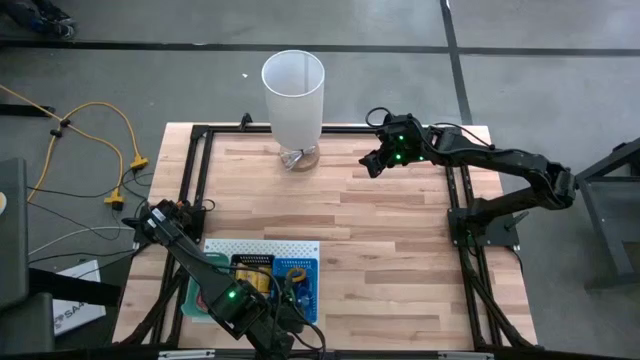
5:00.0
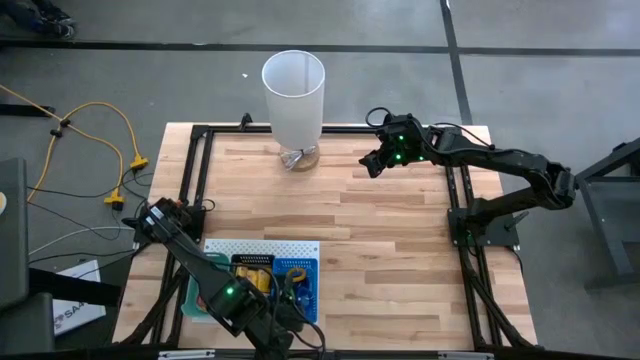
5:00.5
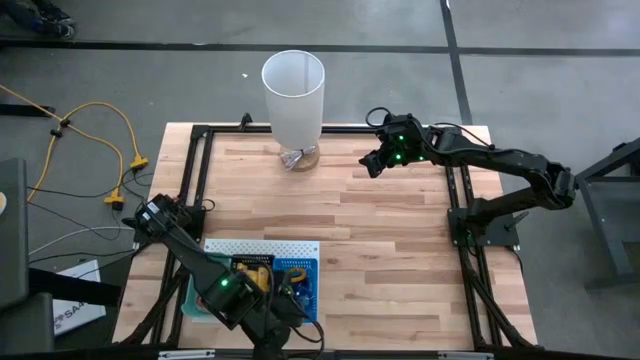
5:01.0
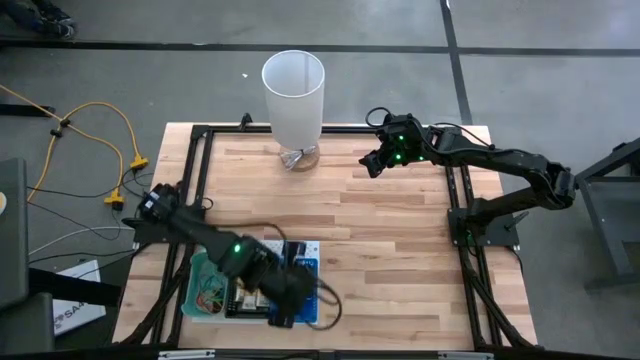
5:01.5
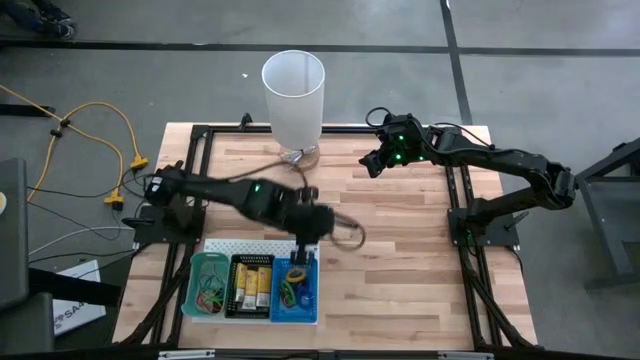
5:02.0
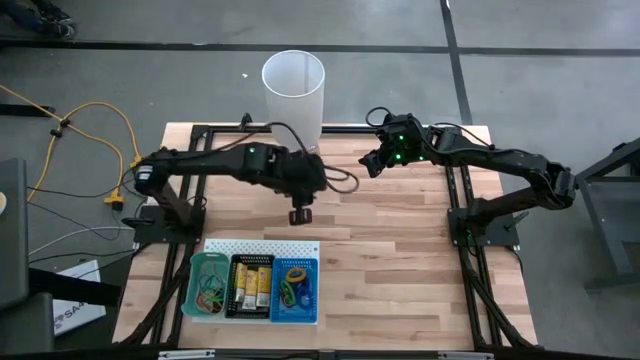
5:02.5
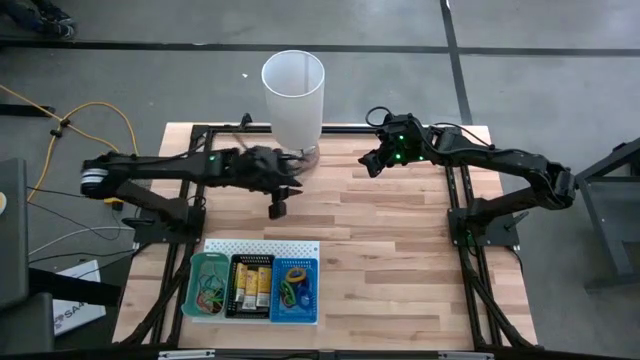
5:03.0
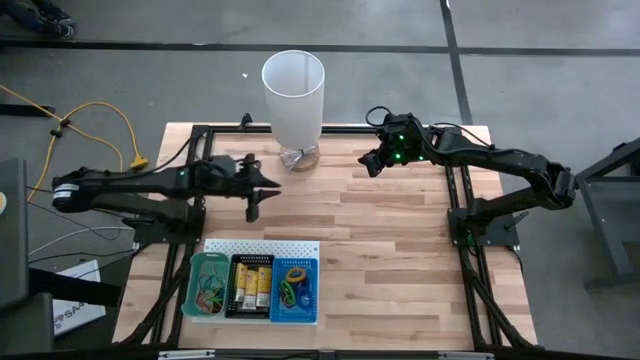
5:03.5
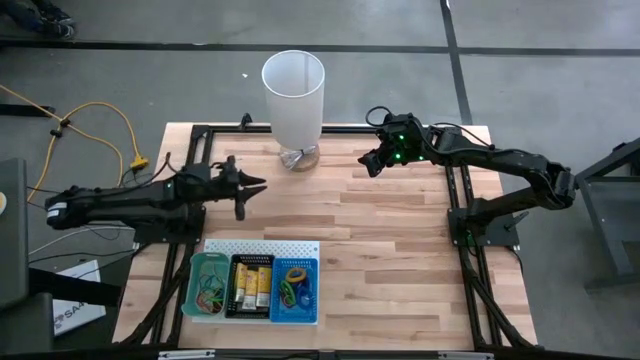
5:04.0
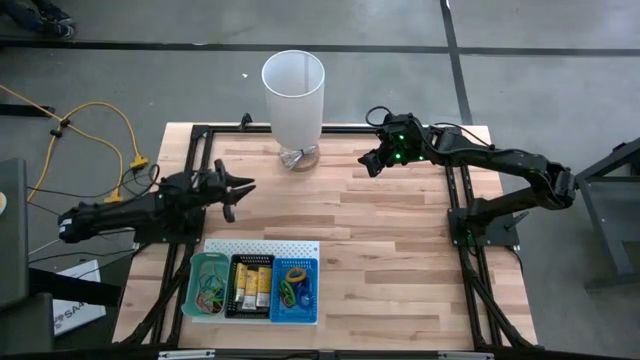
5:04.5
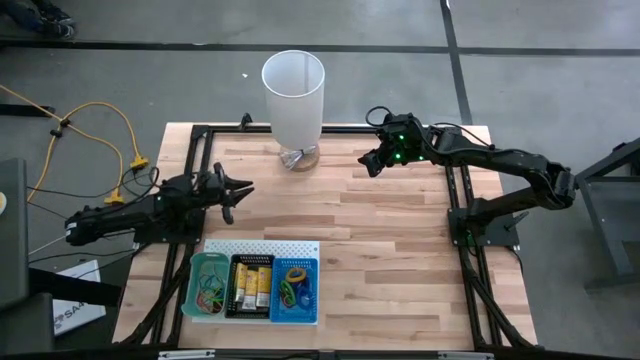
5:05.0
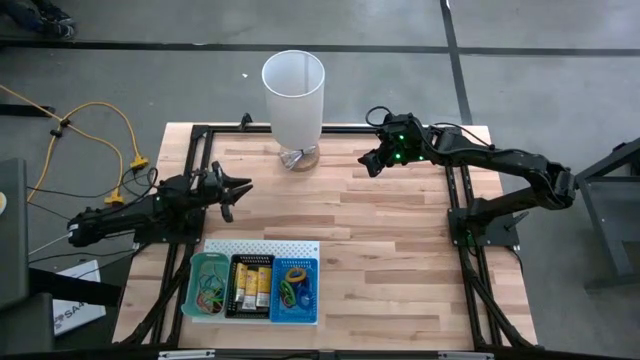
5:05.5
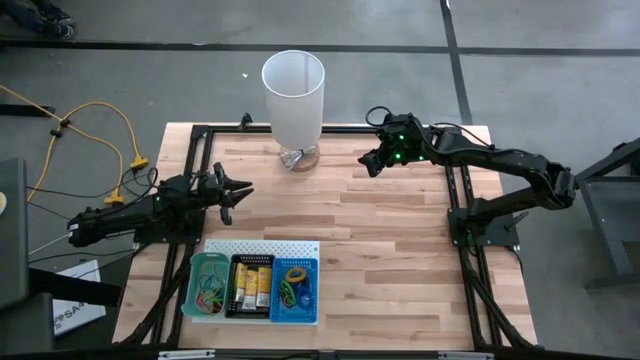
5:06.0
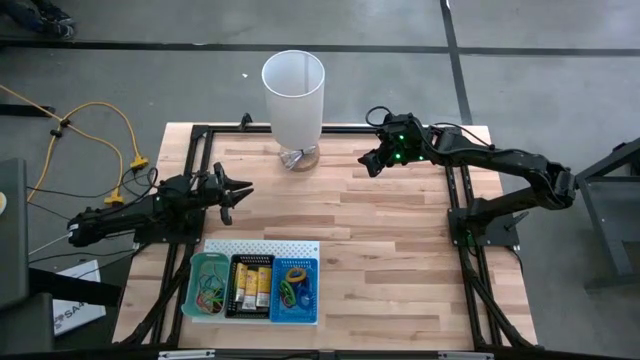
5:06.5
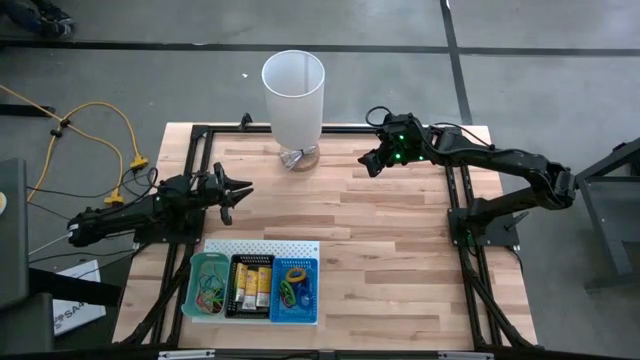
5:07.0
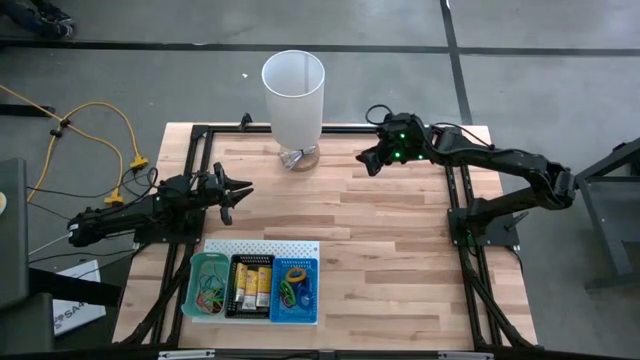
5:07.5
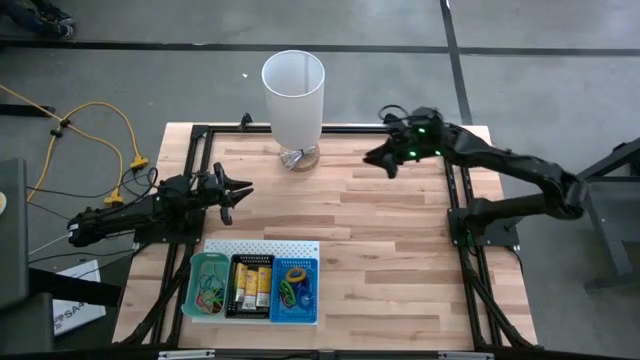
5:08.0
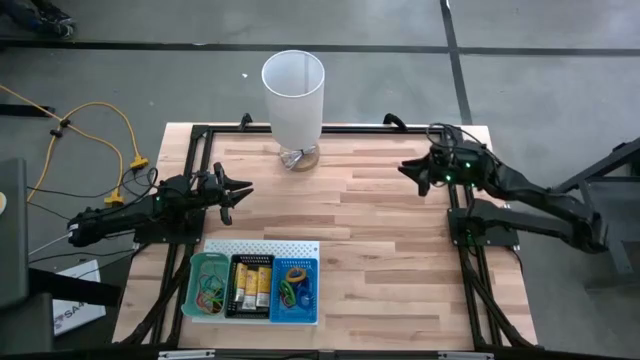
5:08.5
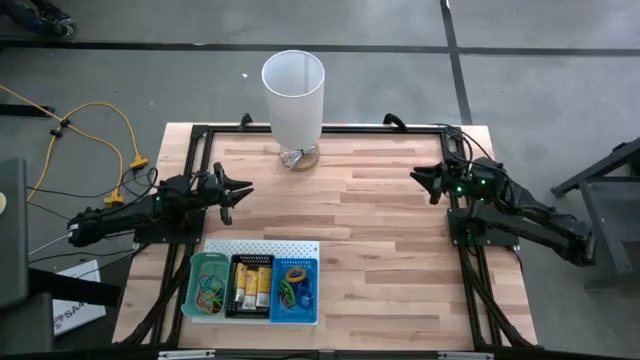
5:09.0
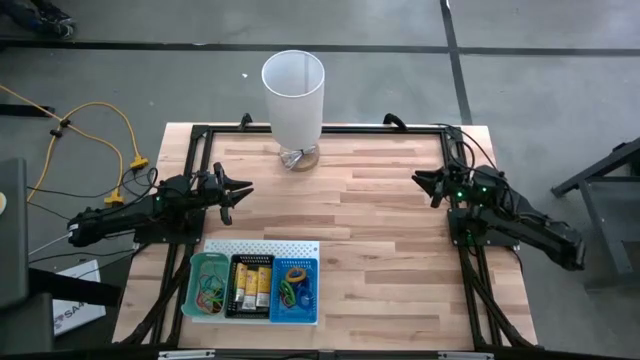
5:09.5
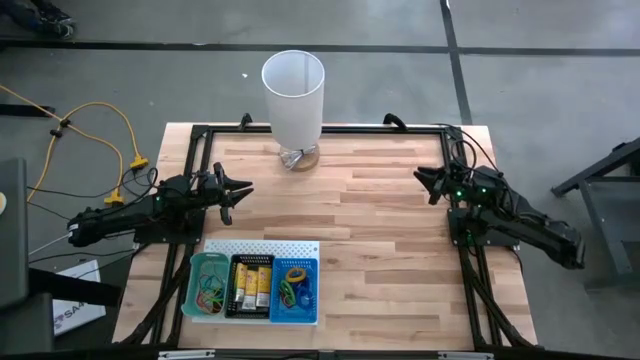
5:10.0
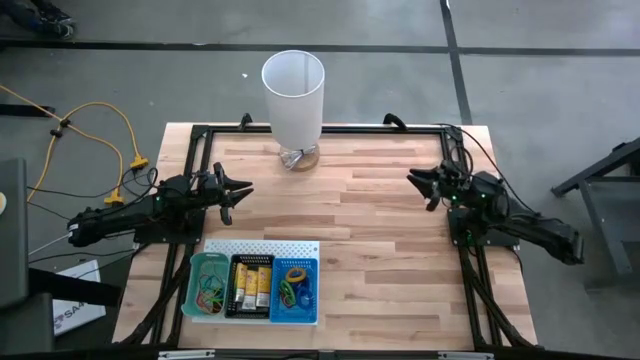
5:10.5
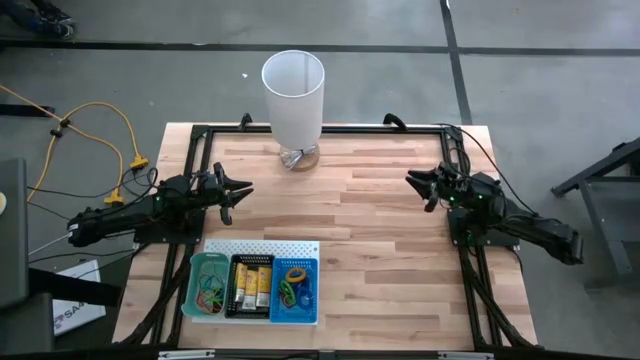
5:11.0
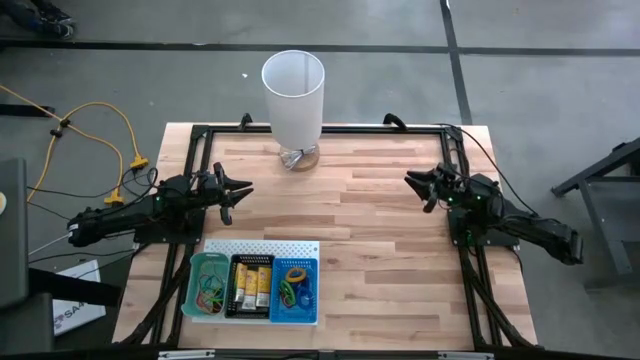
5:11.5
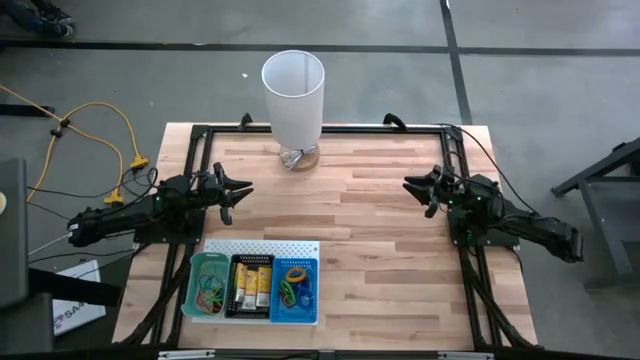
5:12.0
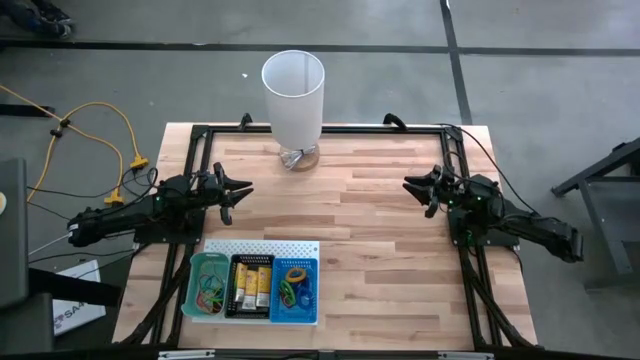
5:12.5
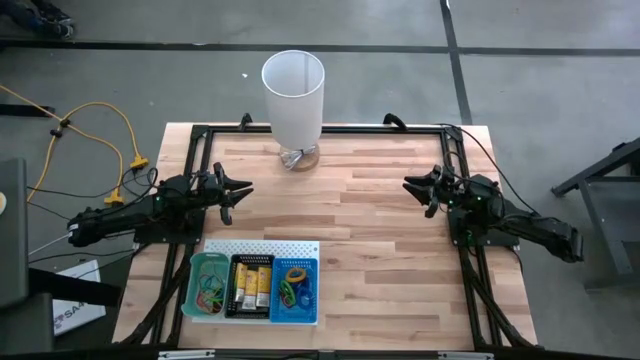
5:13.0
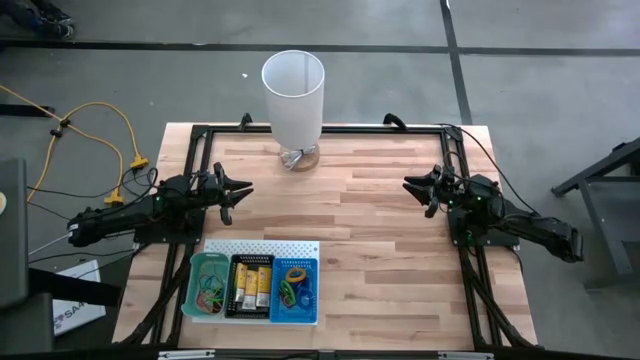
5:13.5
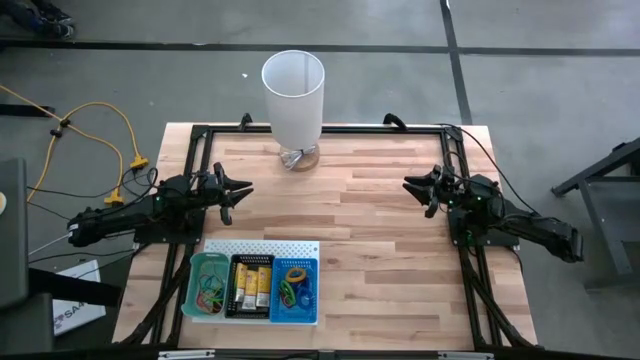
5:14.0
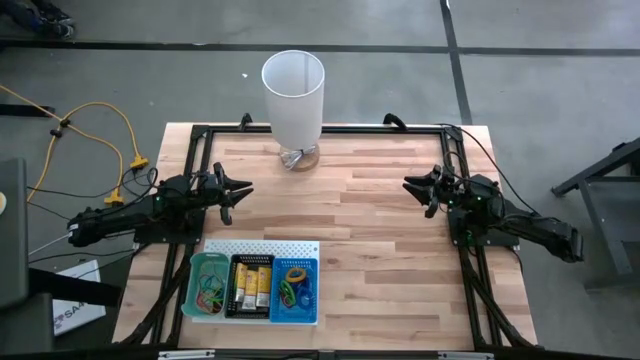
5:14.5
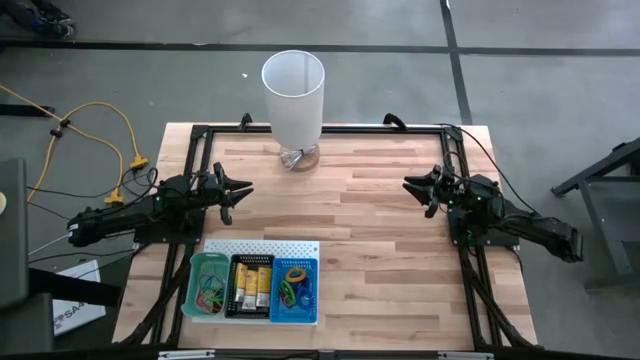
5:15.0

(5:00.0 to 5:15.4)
Task: Pick & Place Office Desk Supplies
Return to Home Position

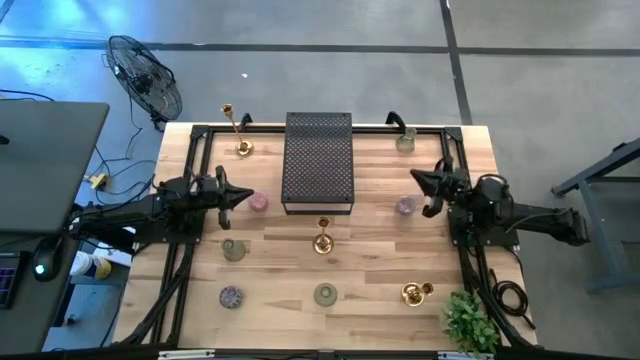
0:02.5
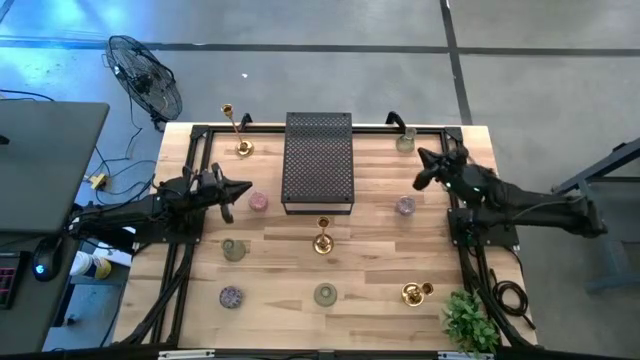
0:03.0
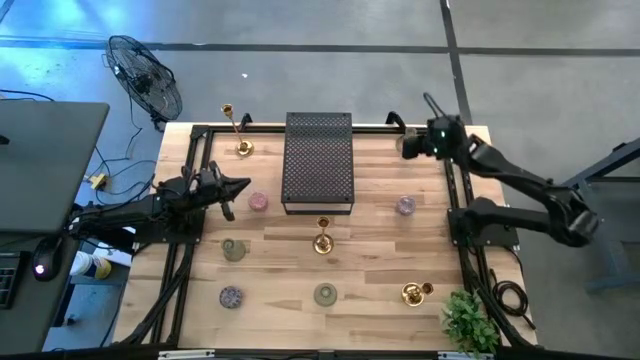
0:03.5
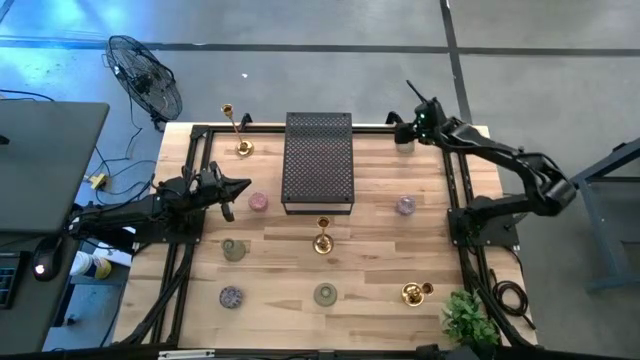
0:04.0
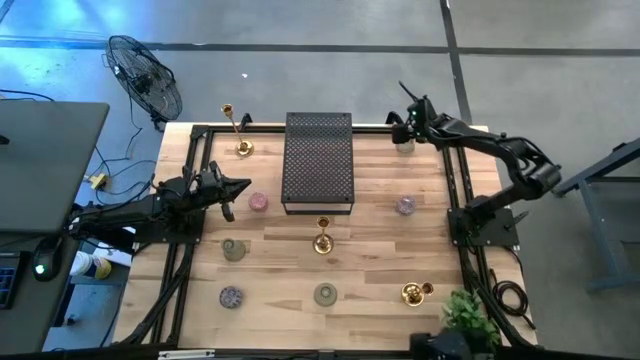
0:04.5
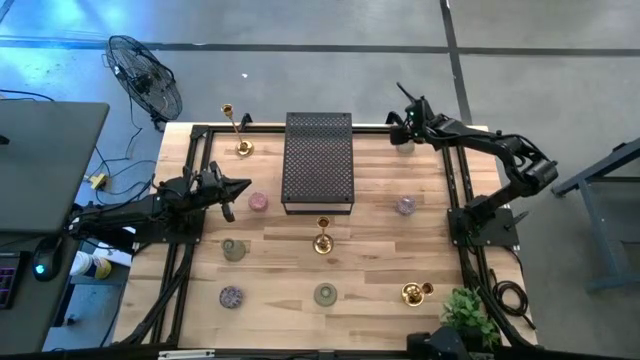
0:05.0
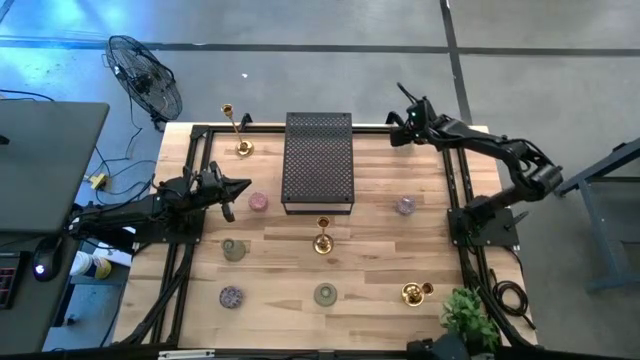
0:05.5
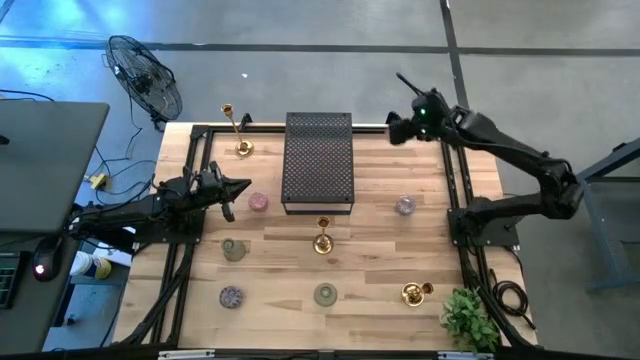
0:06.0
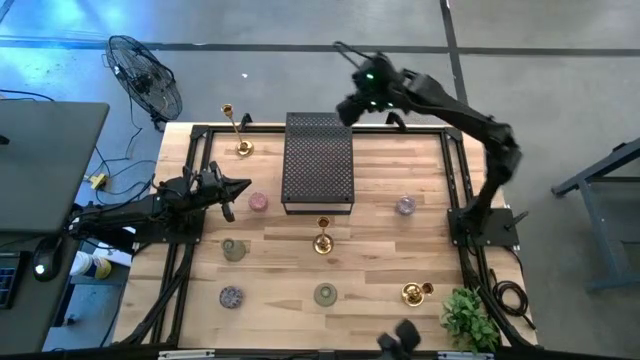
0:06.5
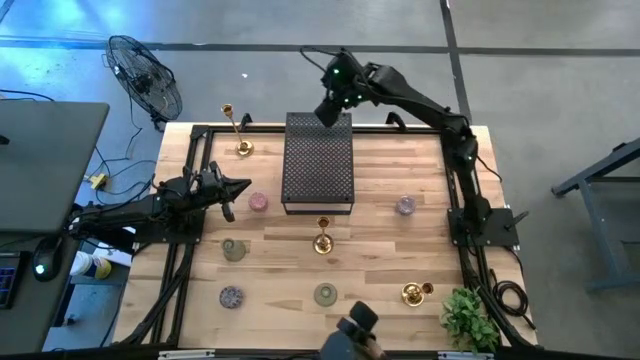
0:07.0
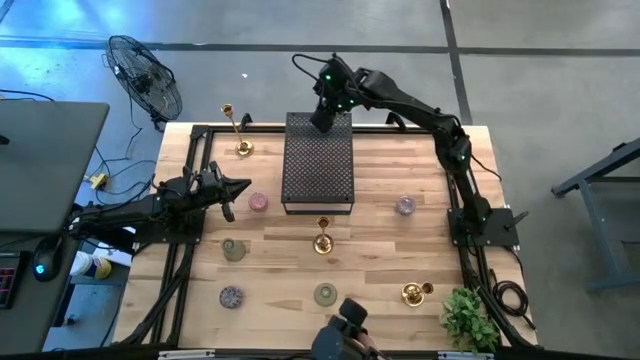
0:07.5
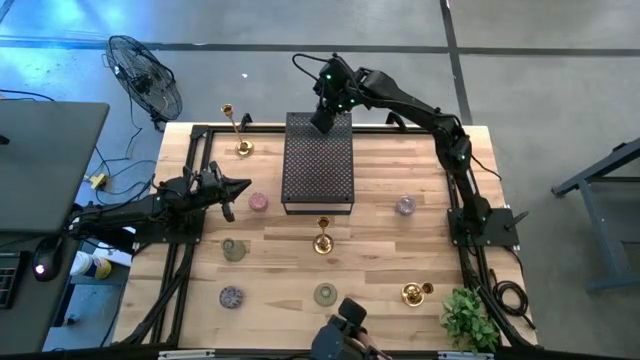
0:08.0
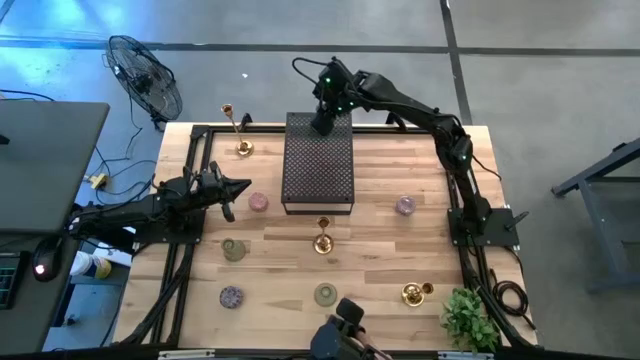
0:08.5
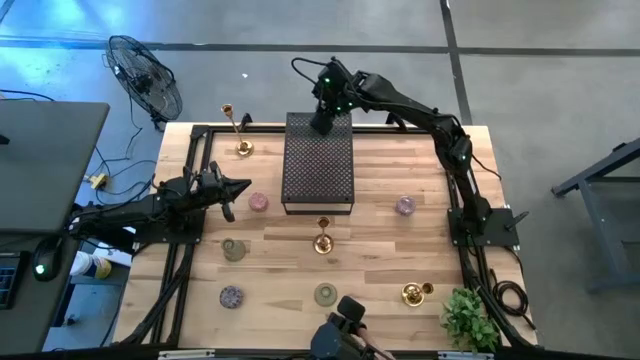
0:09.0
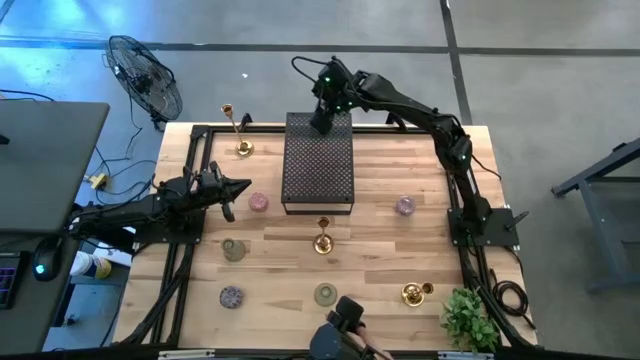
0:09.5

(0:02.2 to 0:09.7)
Task: Pick & Place candle stick holders
Put the top green candle holder on the shelf
